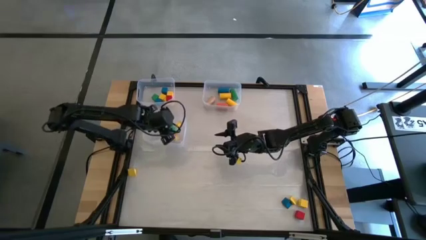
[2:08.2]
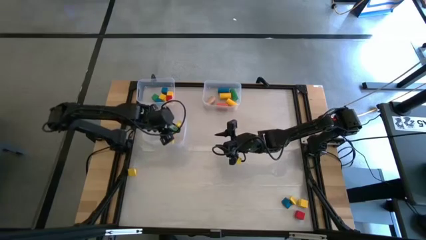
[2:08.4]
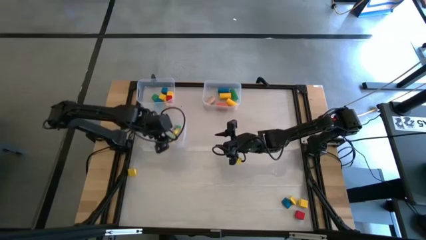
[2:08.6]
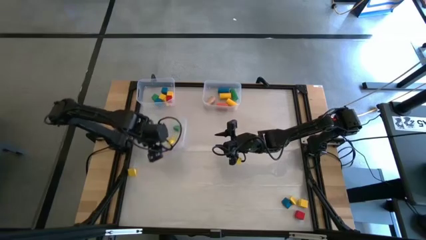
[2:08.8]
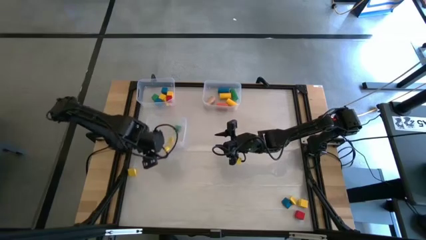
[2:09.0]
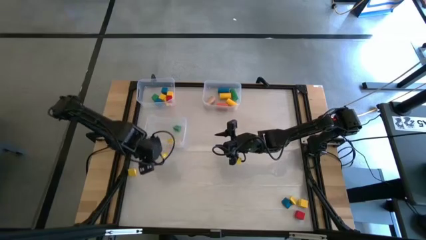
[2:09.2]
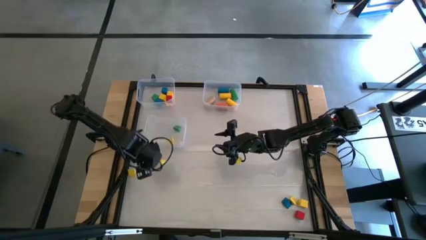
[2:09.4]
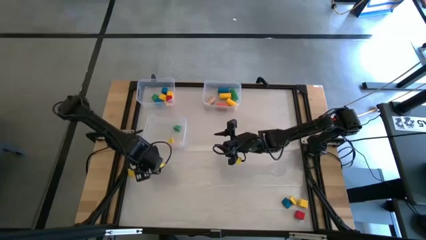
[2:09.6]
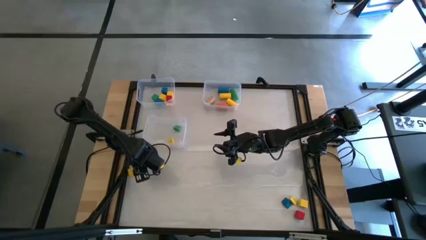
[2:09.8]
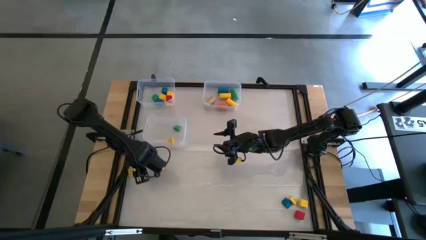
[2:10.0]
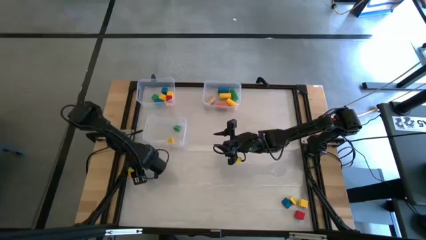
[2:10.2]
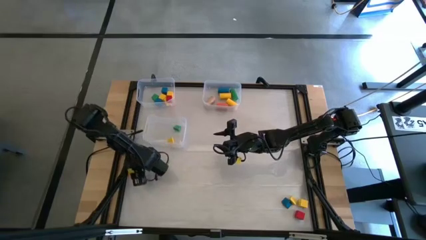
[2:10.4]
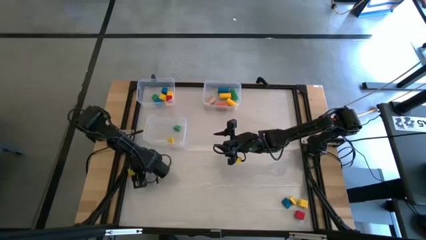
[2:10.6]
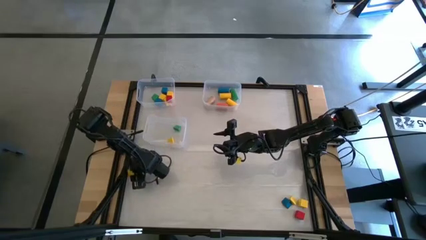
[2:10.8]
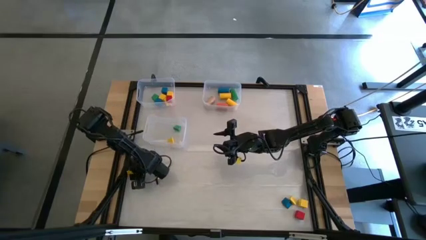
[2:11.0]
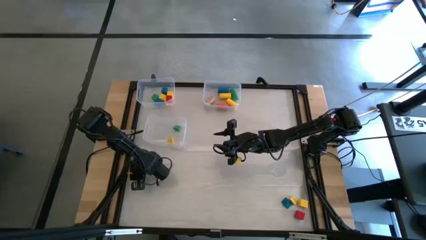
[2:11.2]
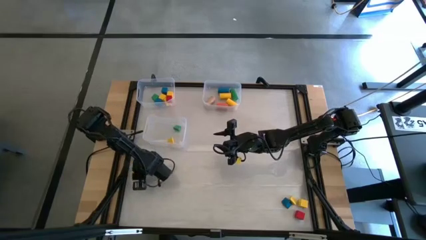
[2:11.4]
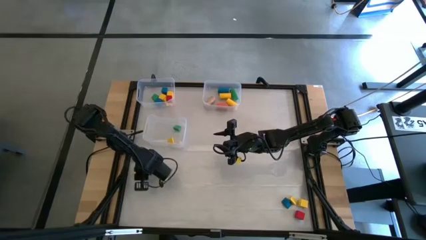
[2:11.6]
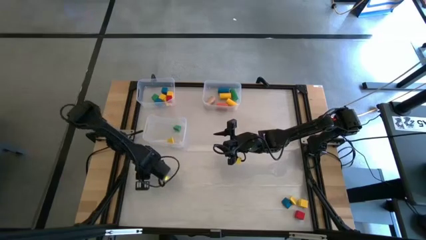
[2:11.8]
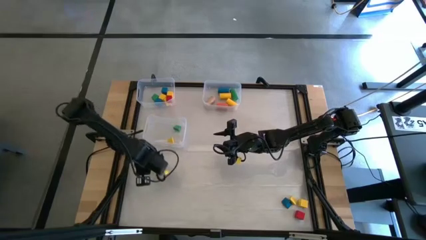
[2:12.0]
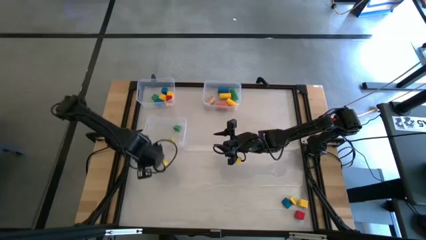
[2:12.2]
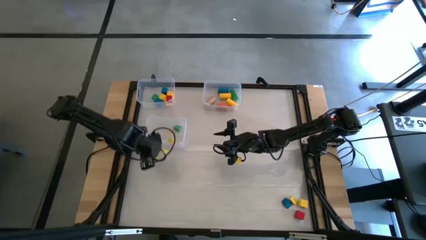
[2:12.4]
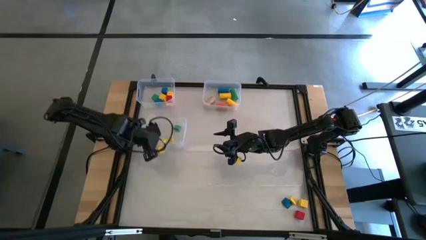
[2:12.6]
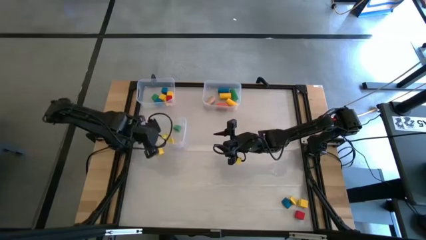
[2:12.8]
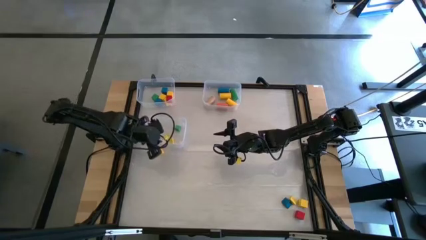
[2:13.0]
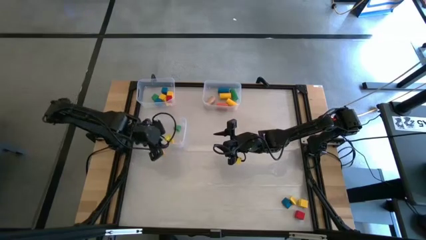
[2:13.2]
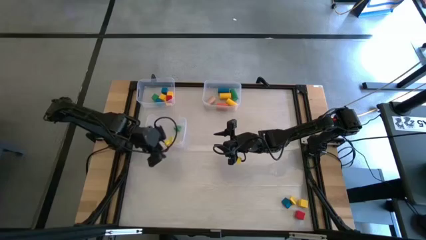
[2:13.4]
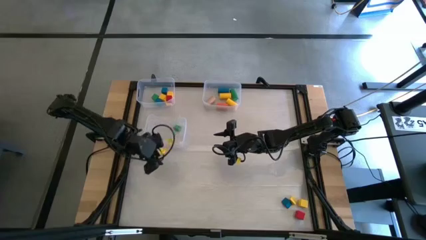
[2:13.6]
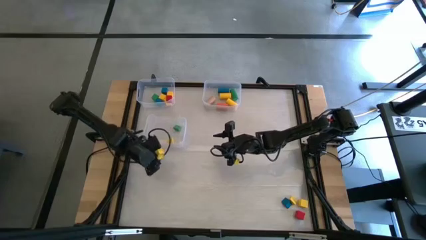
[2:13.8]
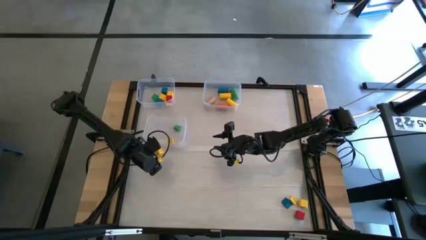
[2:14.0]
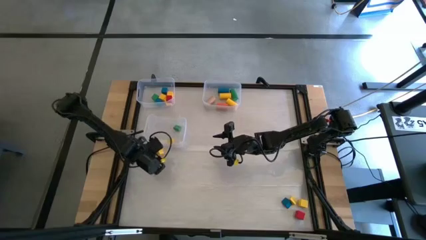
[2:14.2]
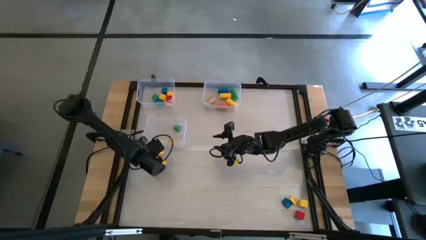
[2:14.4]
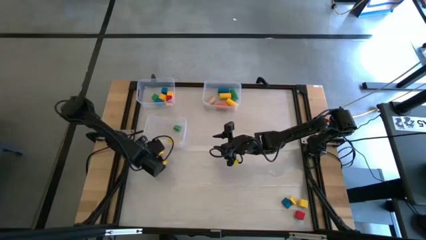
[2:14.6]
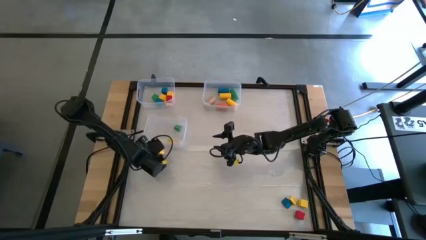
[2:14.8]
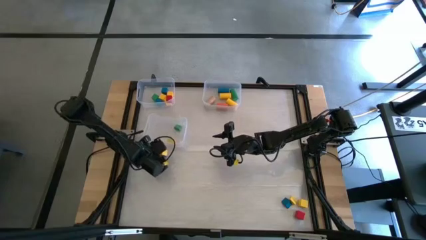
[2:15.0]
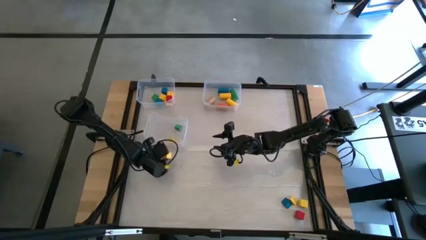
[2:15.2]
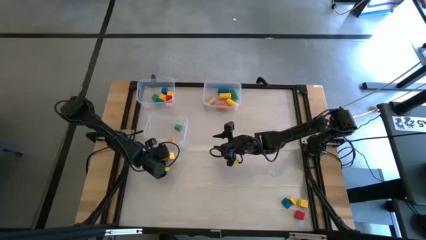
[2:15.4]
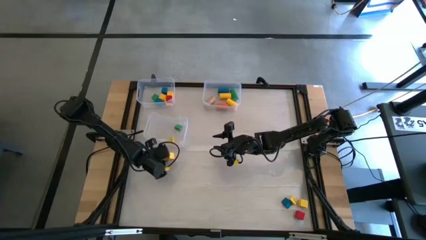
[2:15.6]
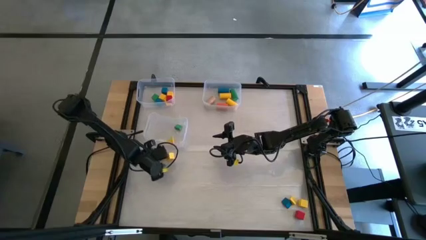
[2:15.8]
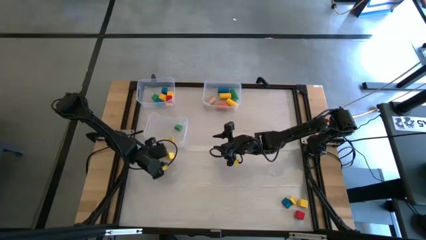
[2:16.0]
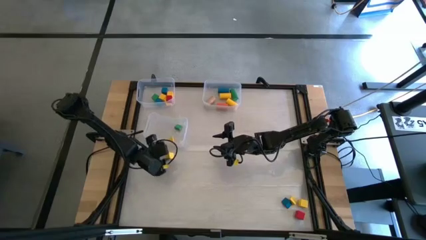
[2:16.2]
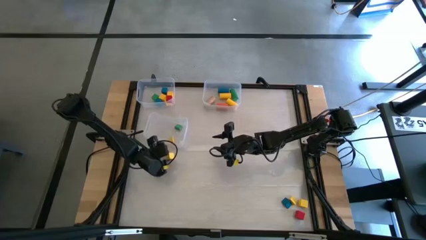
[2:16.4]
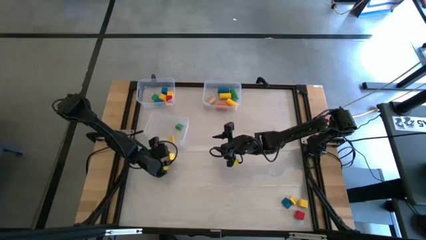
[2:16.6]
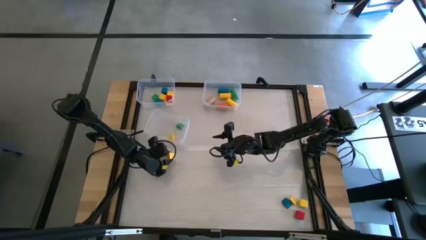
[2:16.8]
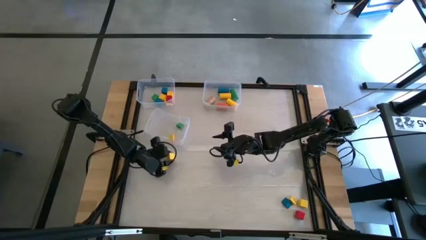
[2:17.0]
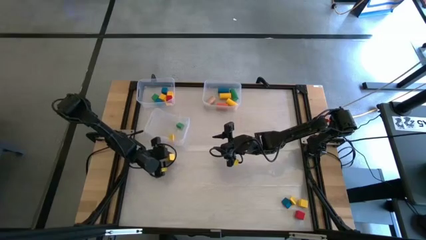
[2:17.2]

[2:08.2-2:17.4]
Task: Sort blocks by size
Put the yellow triangle game block into the bottom left transparent bin

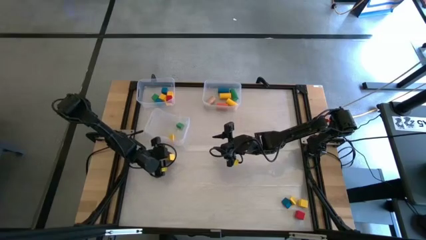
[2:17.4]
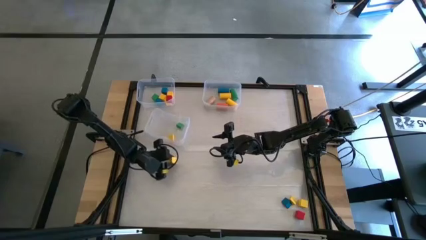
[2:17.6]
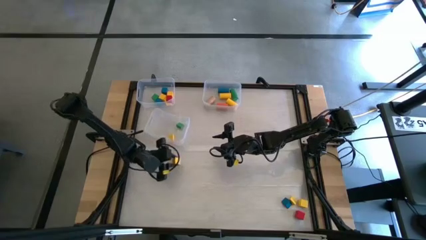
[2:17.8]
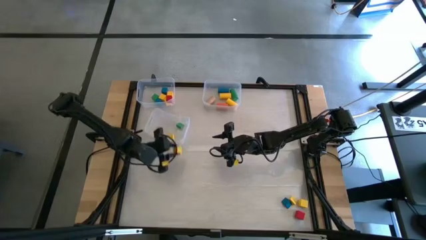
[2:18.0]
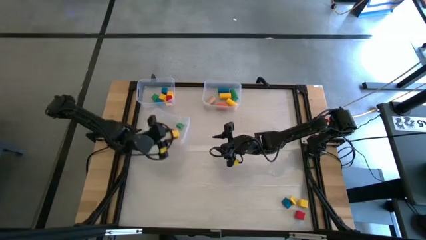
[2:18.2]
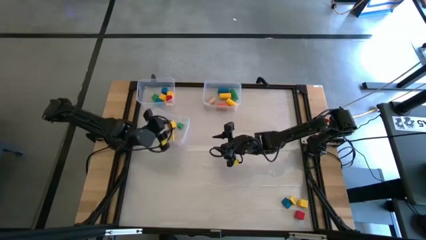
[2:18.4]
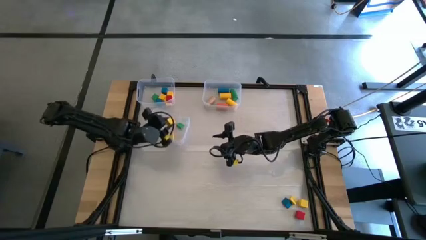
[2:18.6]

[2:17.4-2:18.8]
Put the yellow triangle game block into the middle left transparent bin

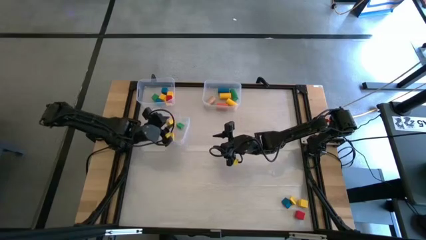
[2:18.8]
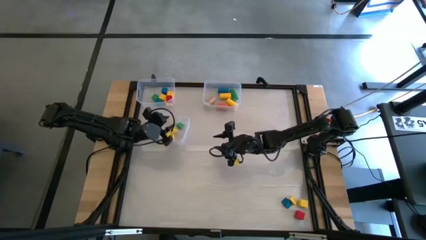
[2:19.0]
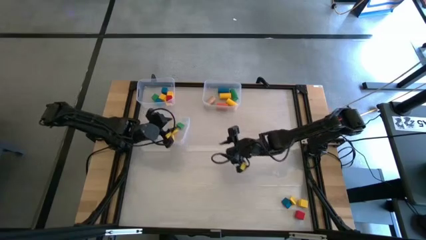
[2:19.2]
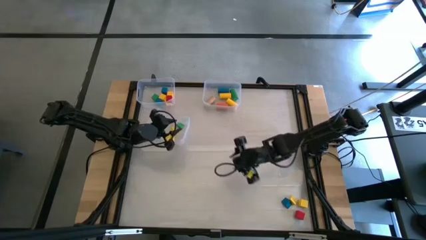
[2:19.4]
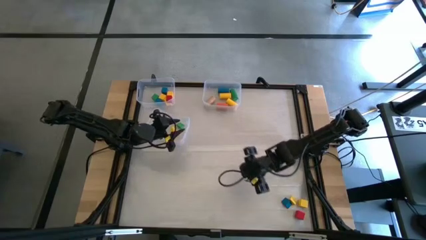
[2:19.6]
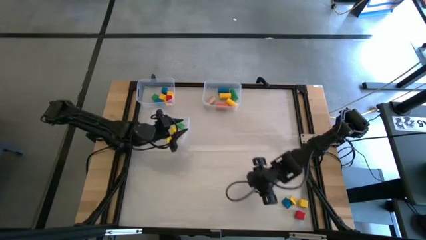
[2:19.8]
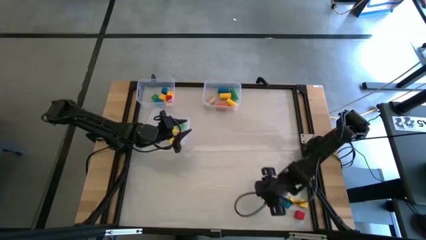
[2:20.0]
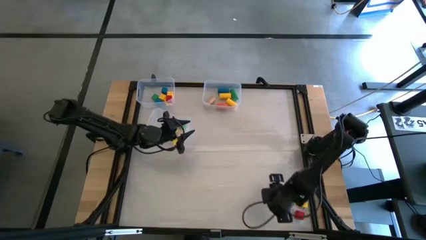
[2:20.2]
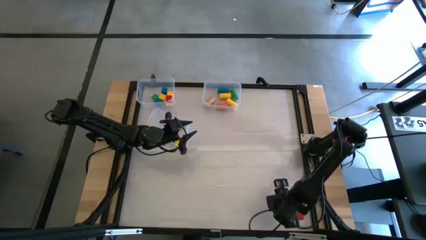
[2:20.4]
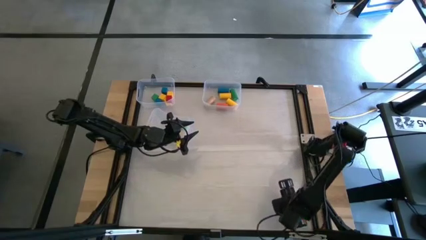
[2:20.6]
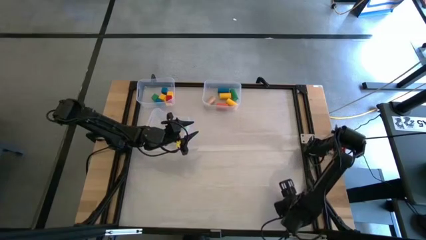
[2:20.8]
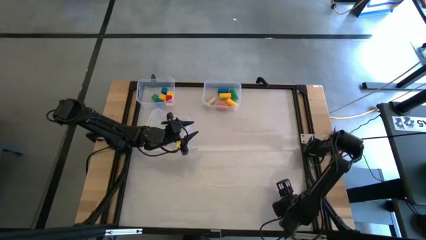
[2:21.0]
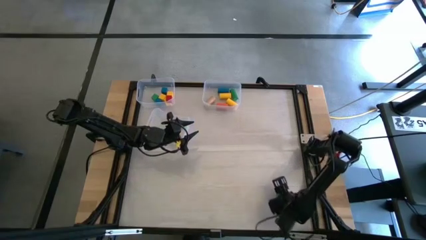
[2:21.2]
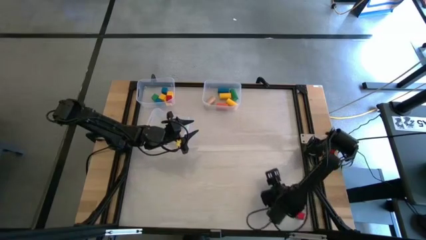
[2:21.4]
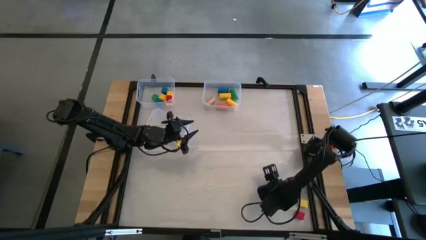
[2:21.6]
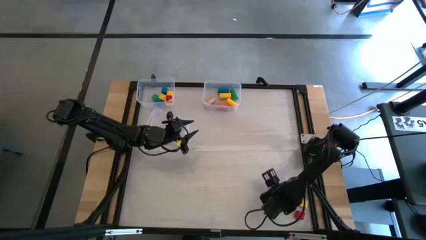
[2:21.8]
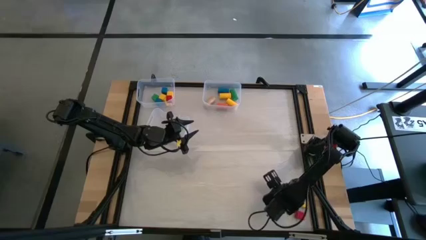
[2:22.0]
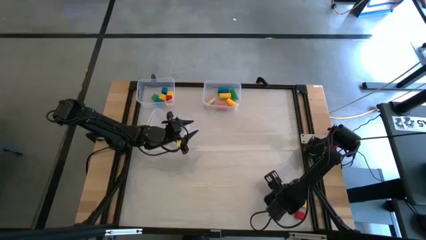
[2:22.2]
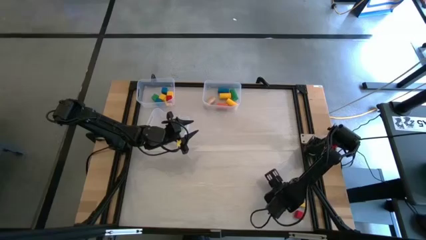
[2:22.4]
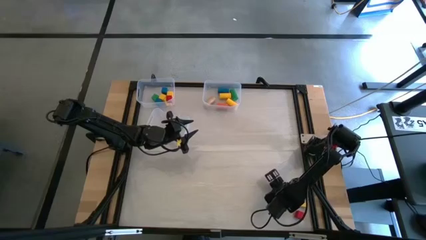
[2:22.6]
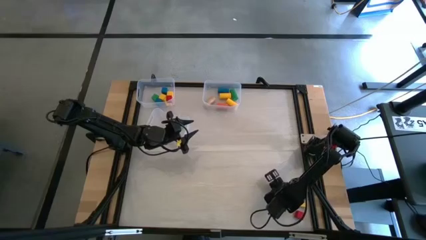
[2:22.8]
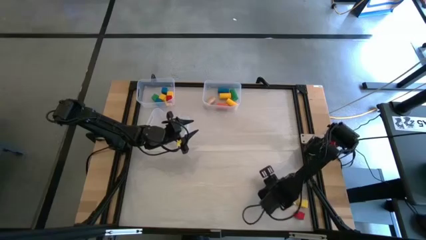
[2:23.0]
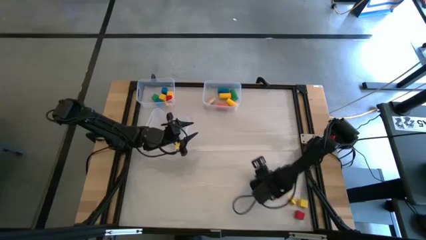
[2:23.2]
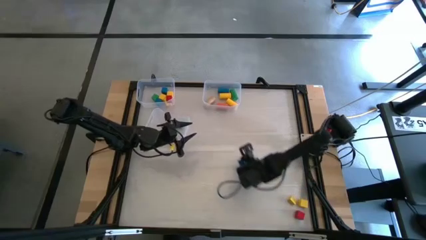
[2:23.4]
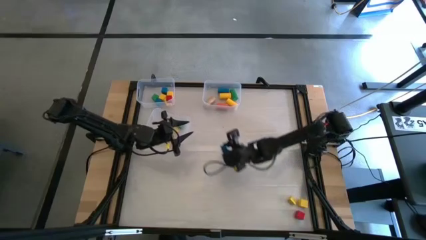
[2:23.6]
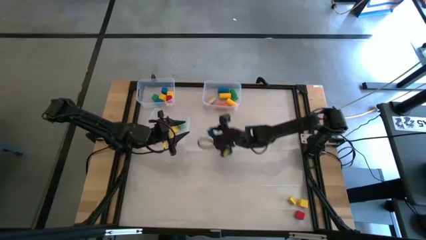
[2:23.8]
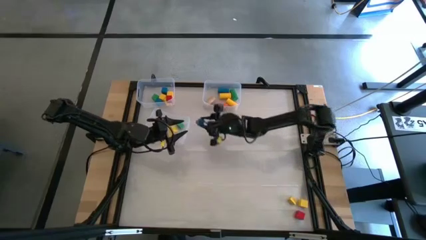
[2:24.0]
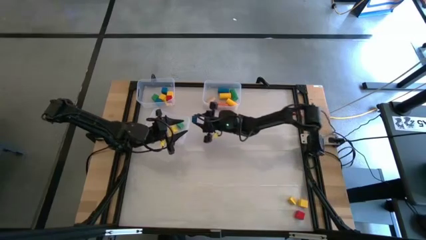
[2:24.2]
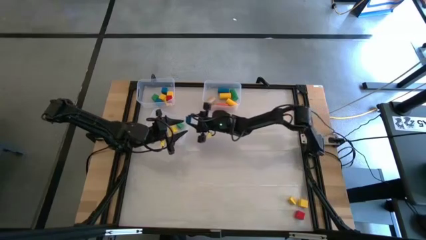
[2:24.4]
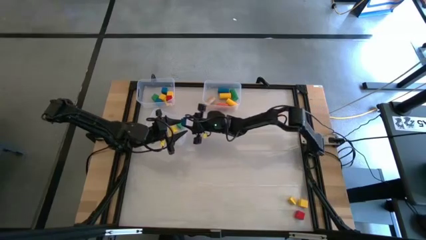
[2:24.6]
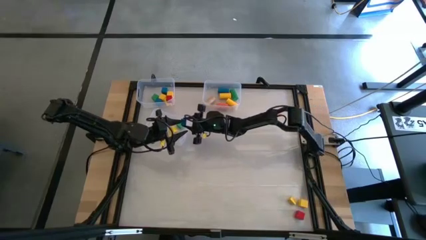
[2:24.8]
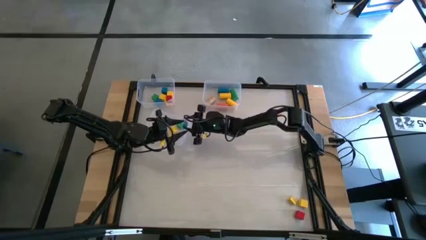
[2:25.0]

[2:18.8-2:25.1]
Put the blue triangle game block into the bottom left transparent bin
